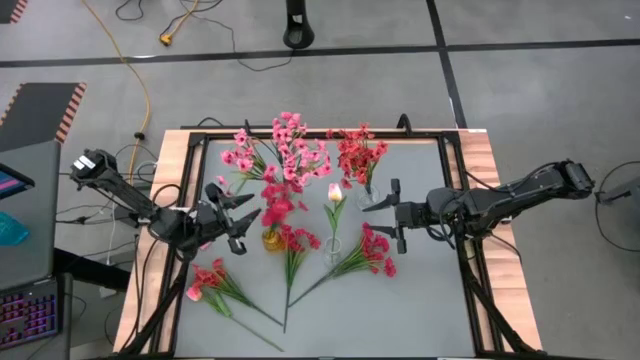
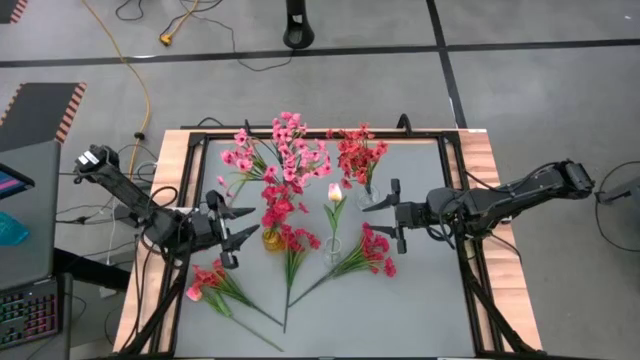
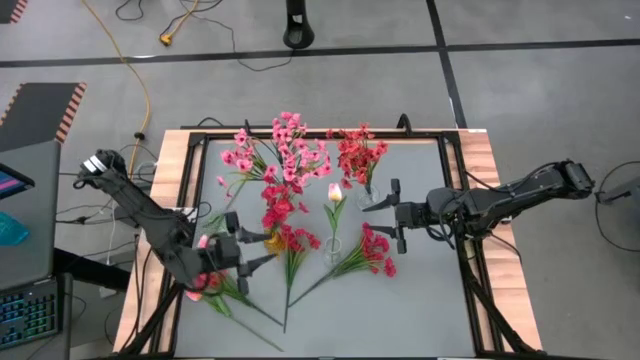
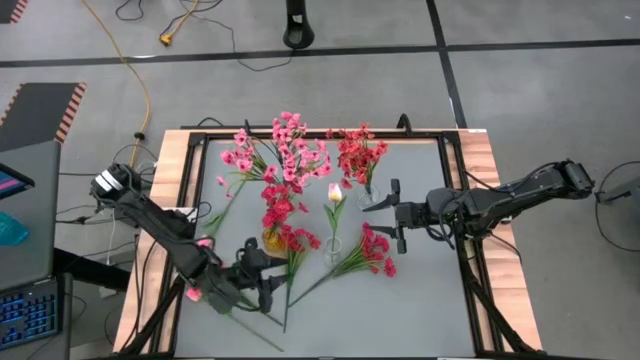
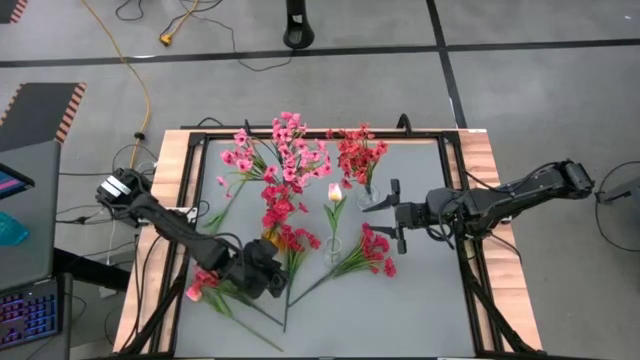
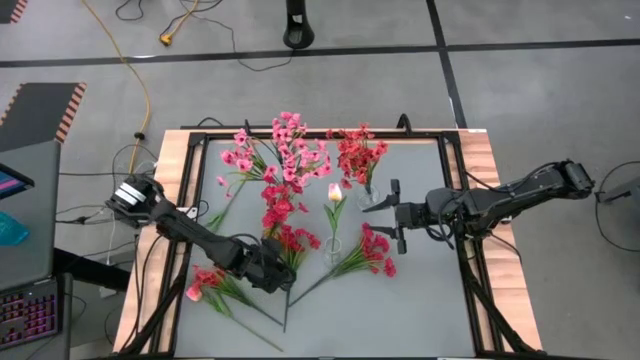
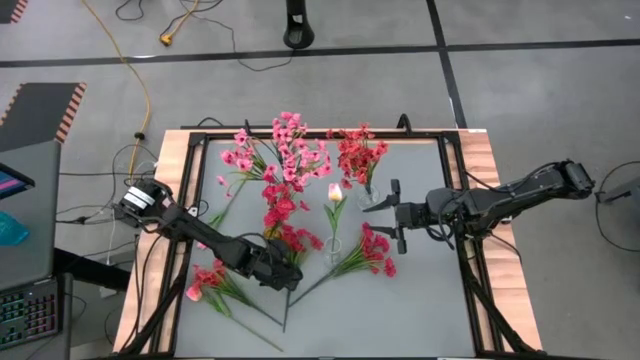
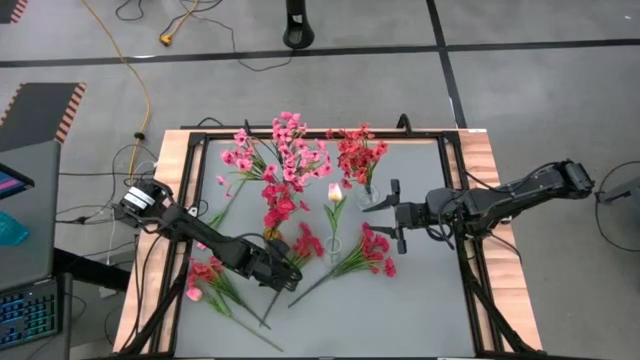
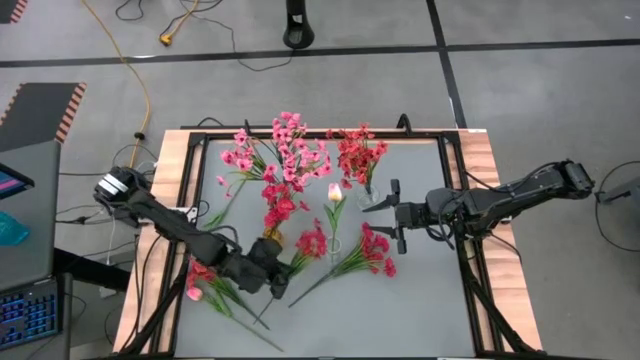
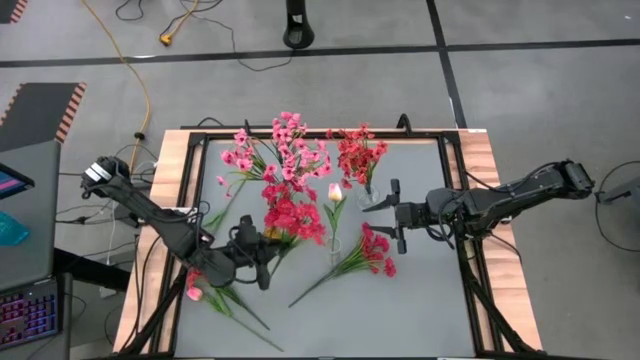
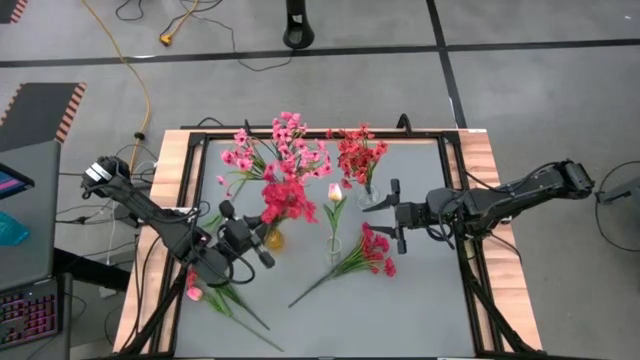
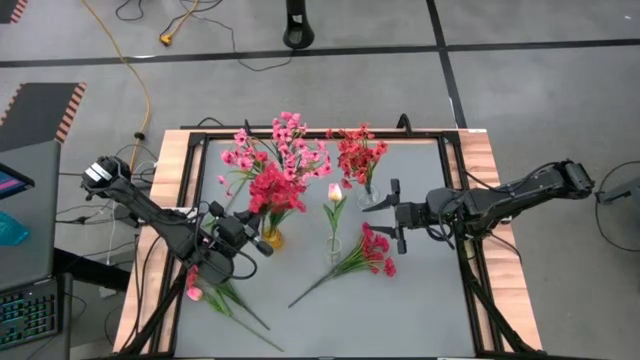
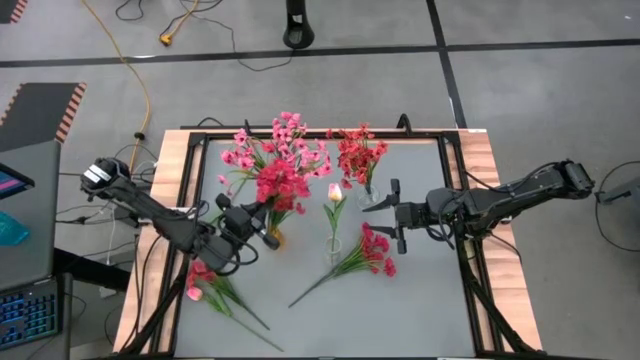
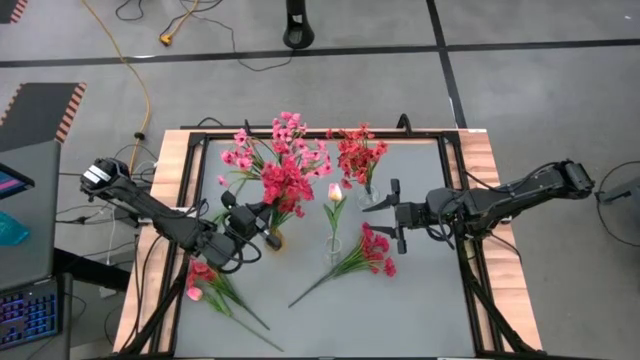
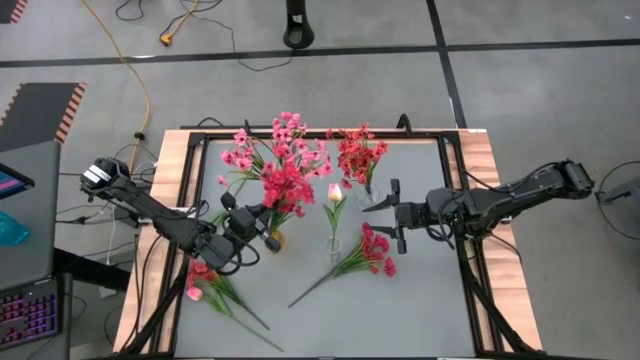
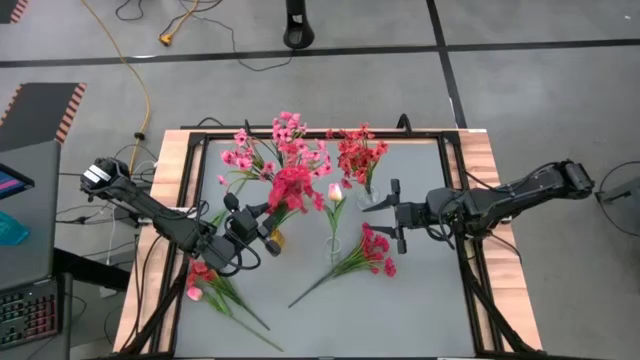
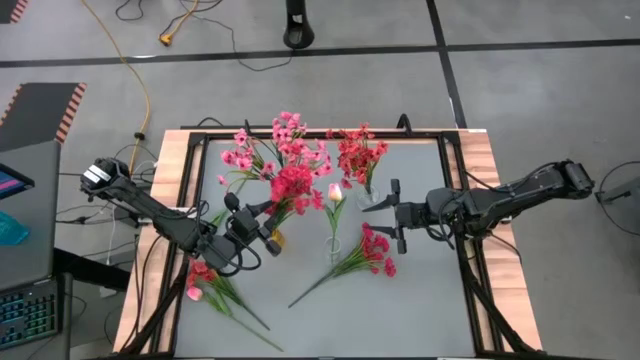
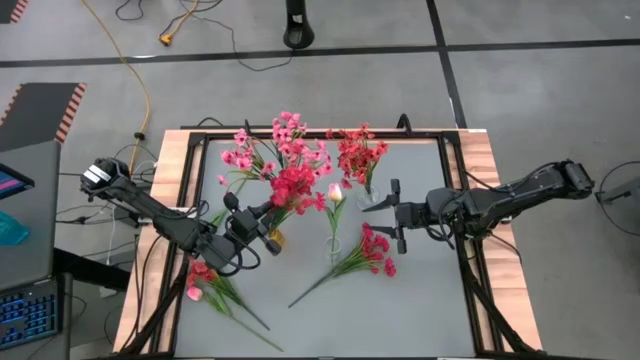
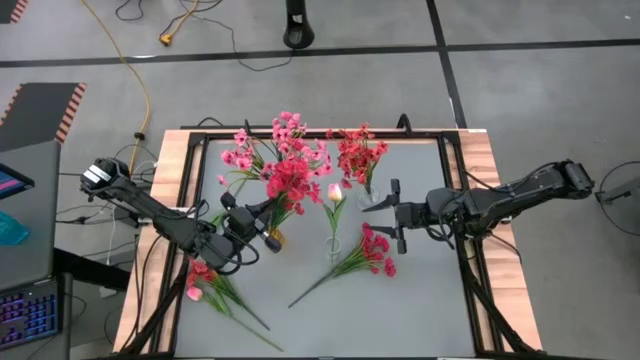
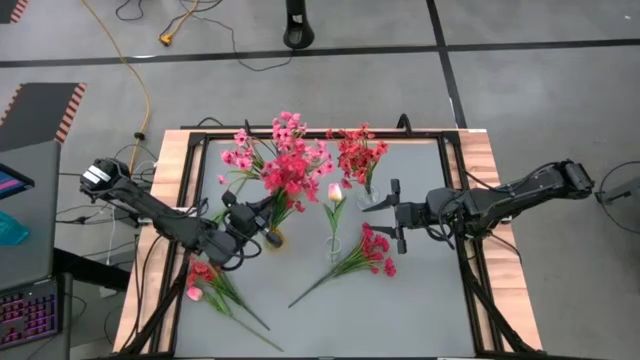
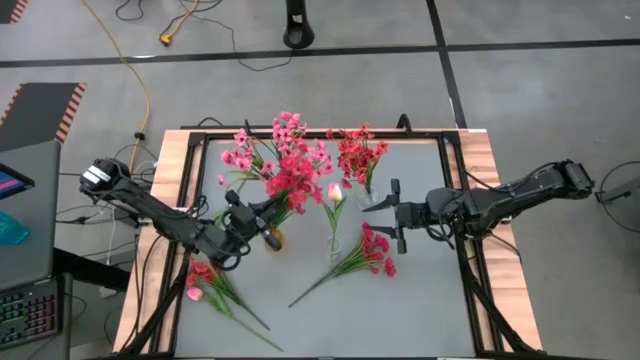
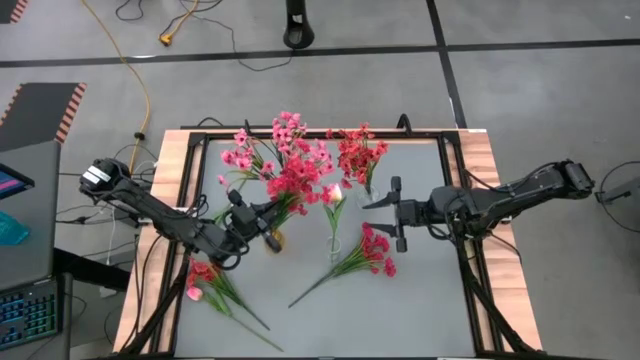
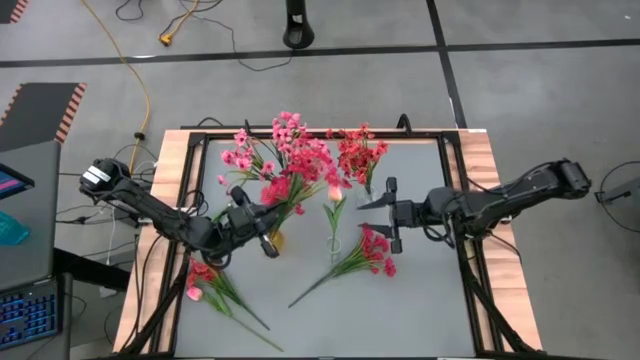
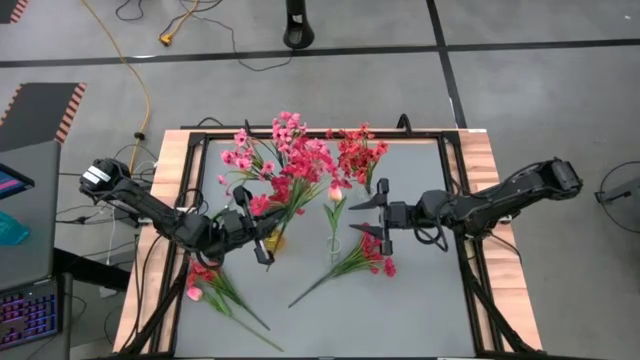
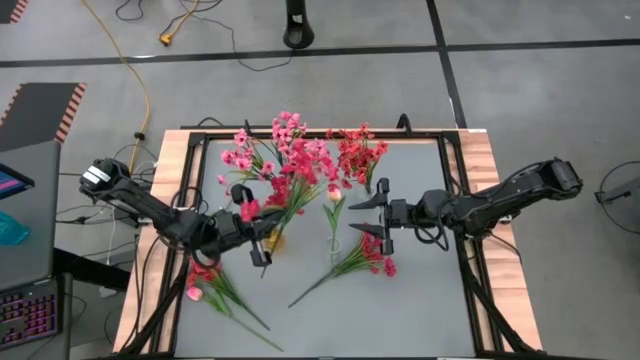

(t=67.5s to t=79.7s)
Task: Sort flowers into vase by color
Put the left red flowers into the yellow vase

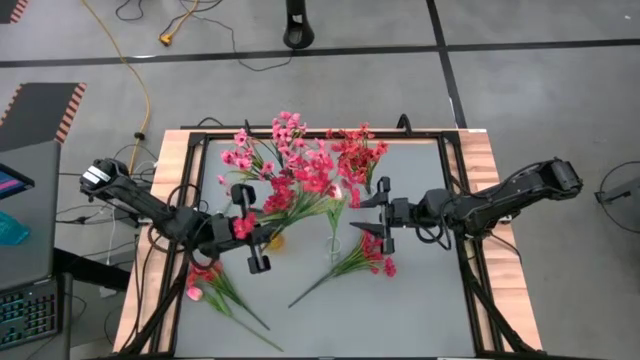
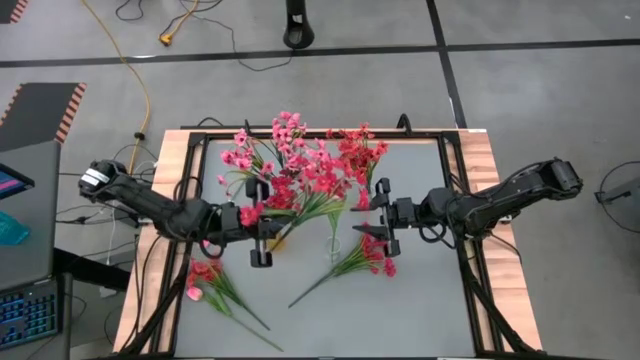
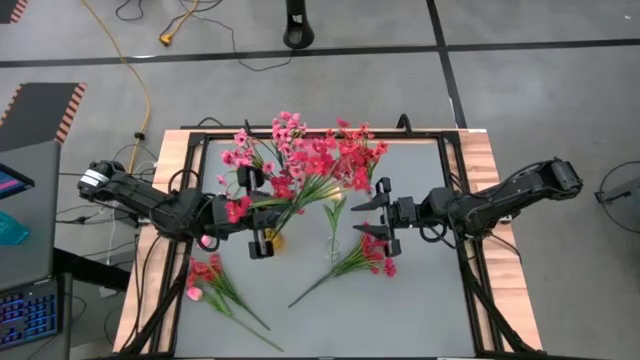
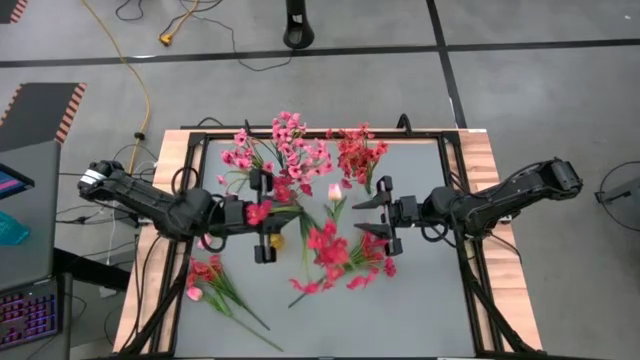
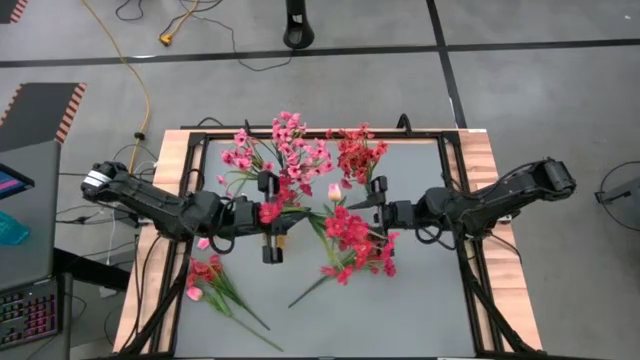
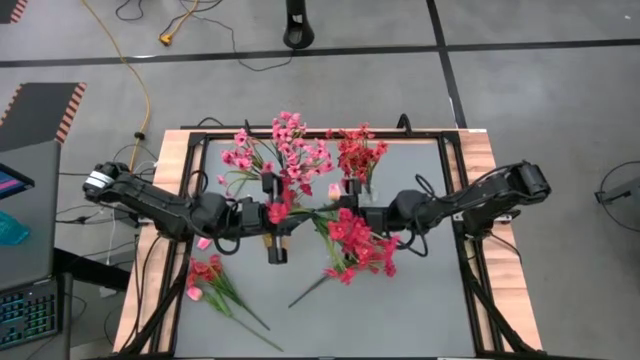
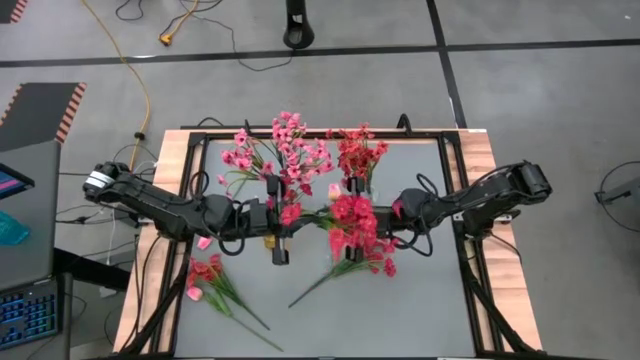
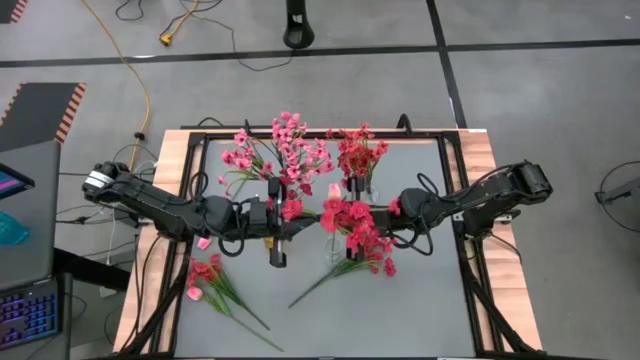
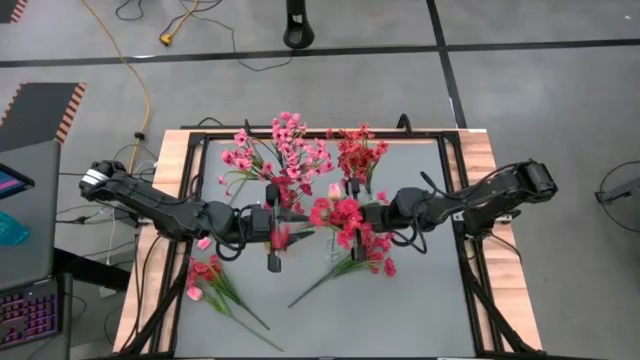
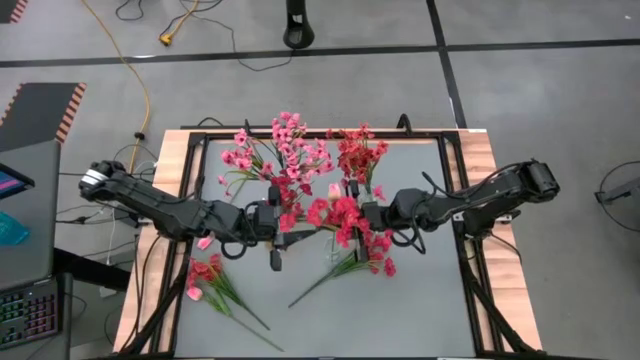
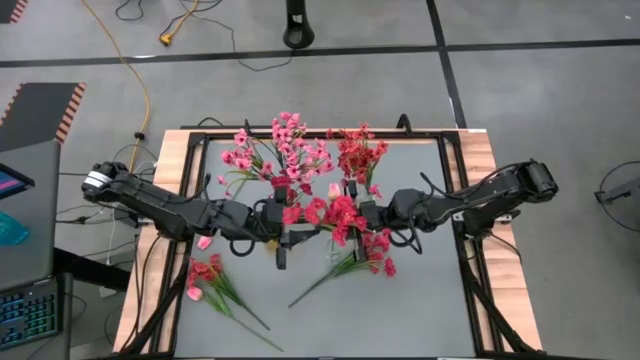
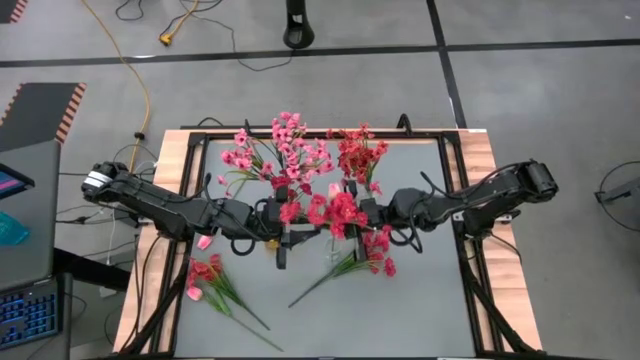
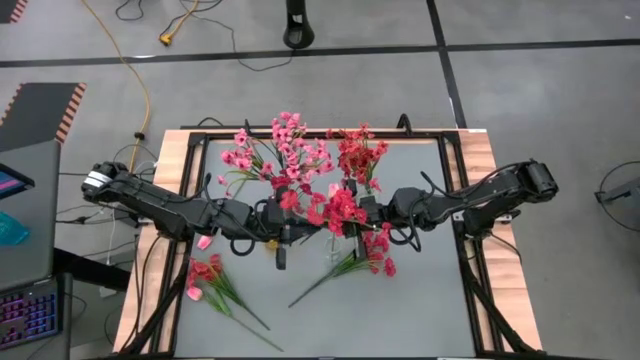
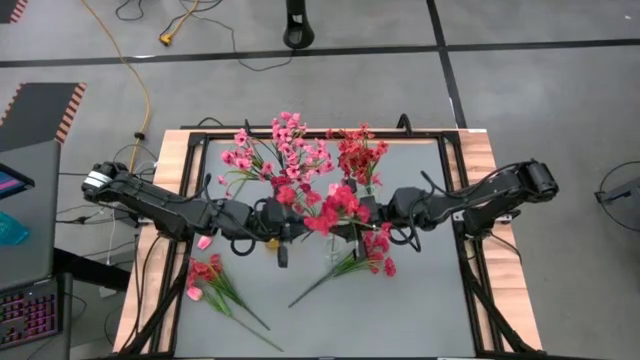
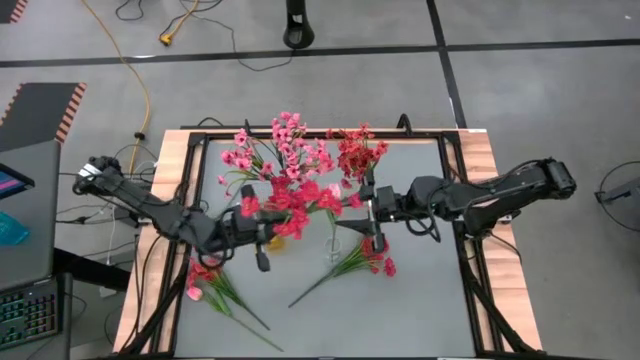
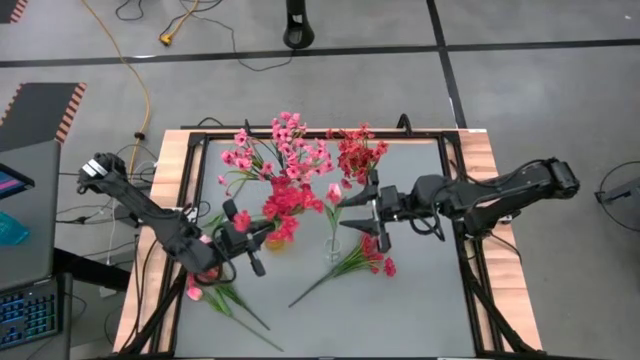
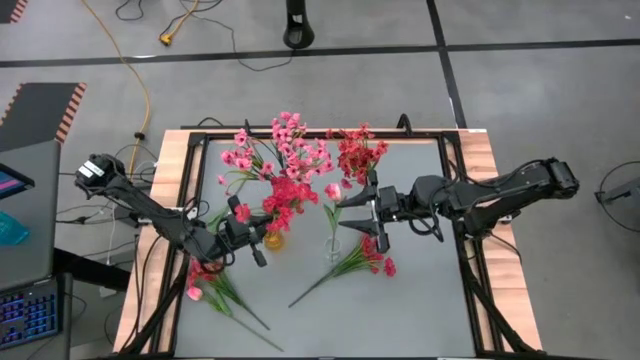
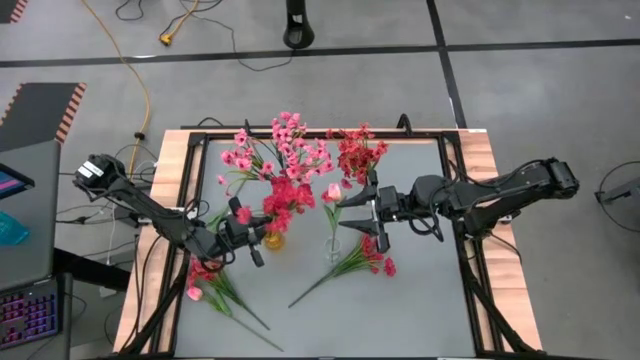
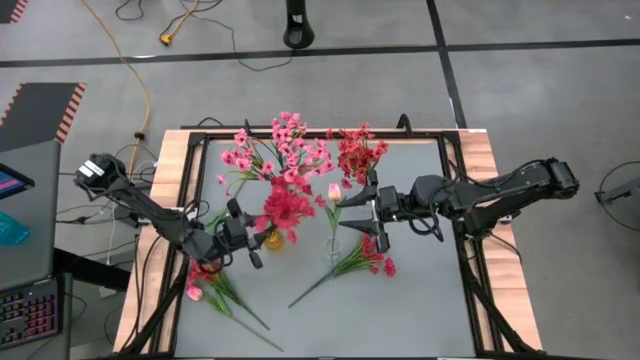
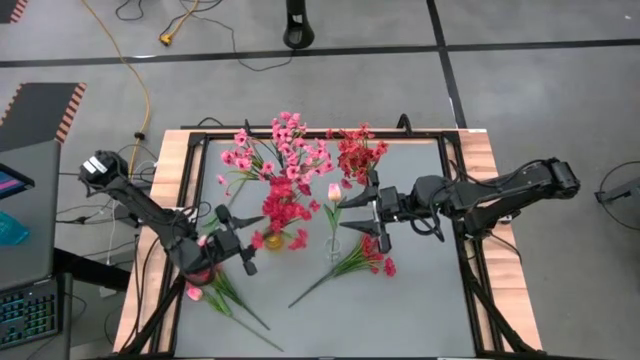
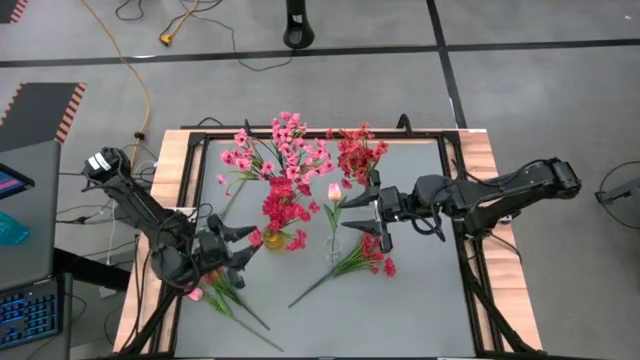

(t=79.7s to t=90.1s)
Put the left red flowers into the yellow vase
